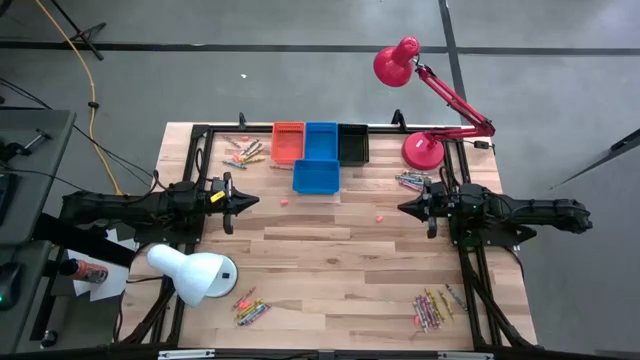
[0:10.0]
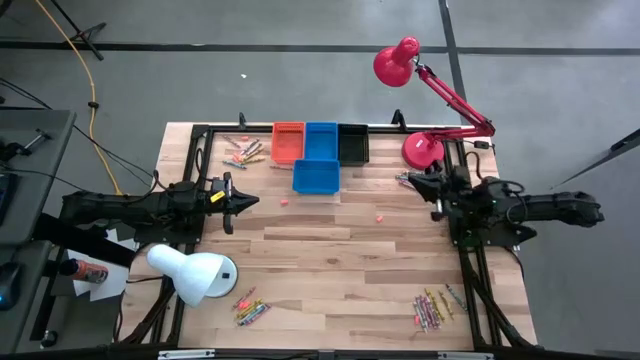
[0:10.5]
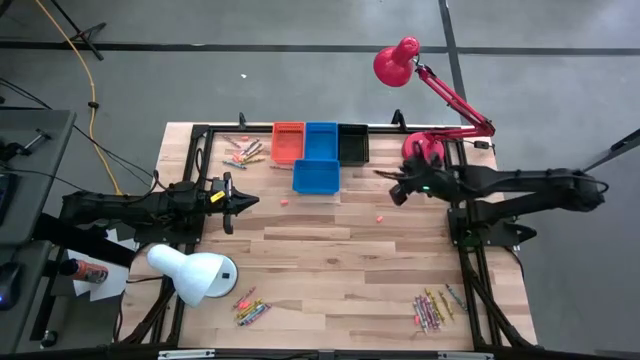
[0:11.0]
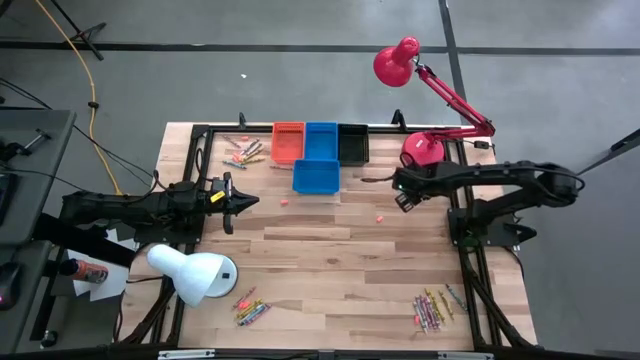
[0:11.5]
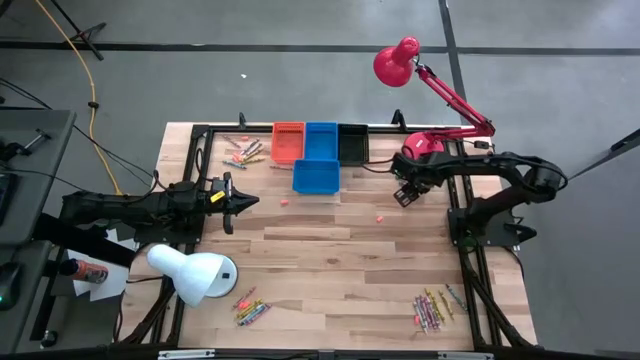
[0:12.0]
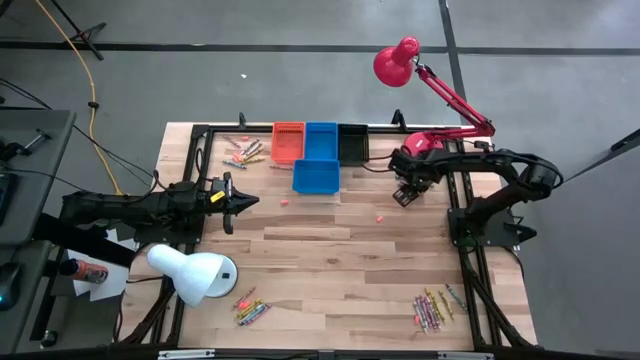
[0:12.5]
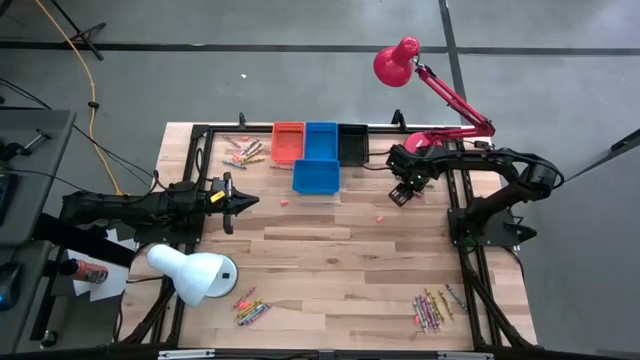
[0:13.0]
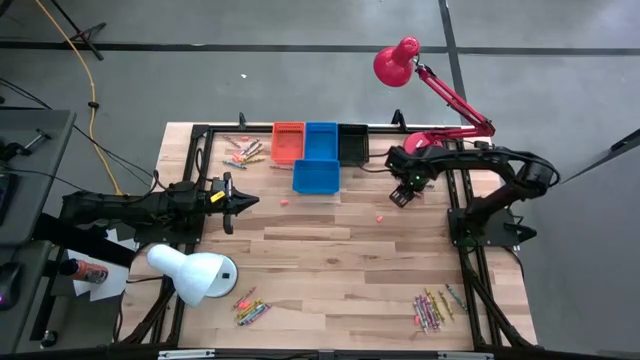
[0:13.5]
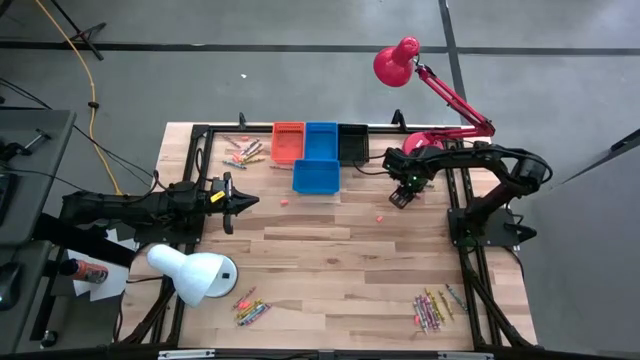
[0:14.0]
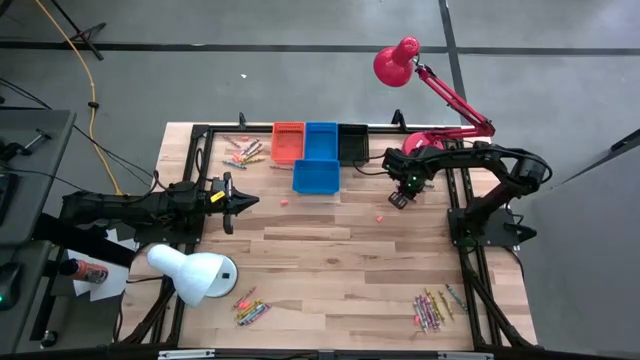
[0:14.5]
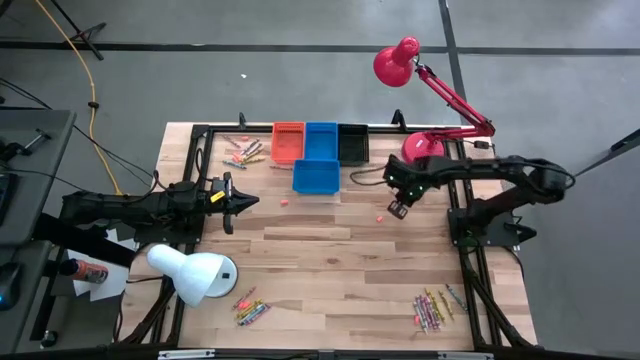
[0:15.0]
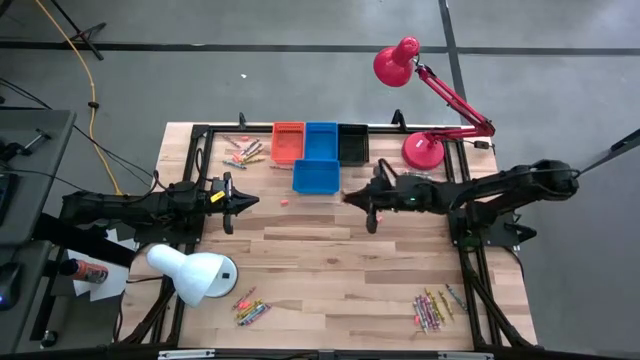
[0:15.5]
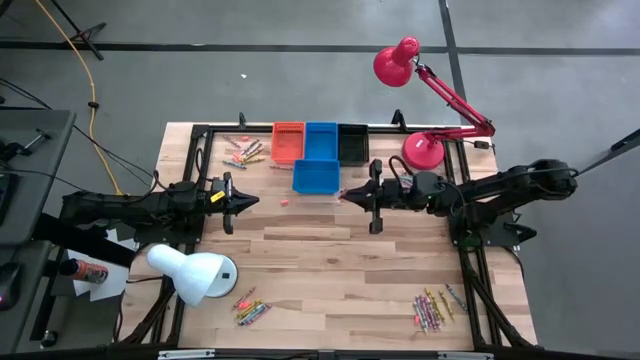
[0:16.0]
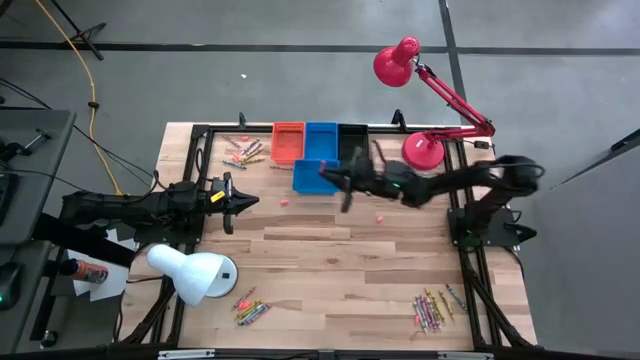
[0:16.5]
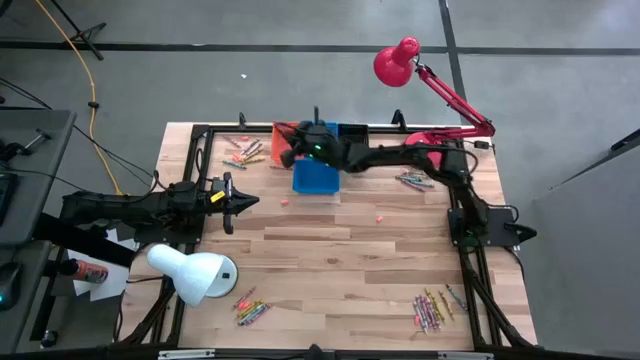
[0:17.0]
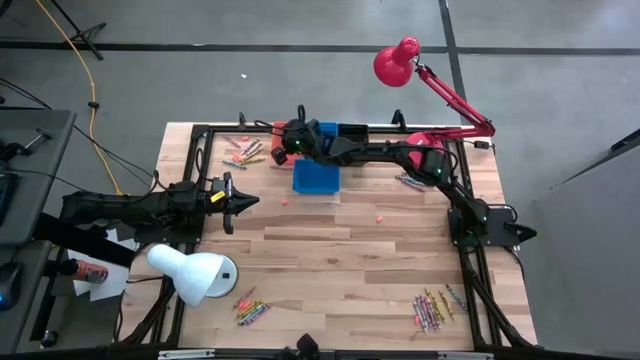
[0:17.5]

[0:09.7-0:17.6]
Task: Sort crayons
Put the pink crayon into the orange bin

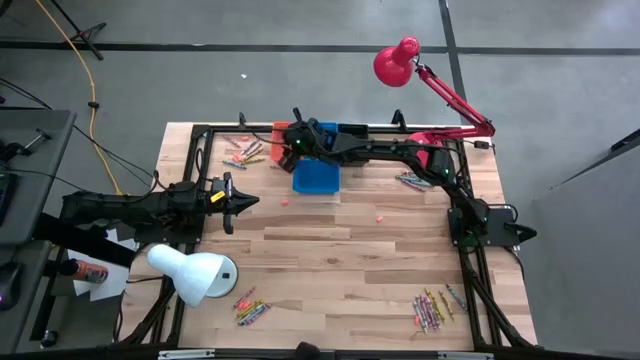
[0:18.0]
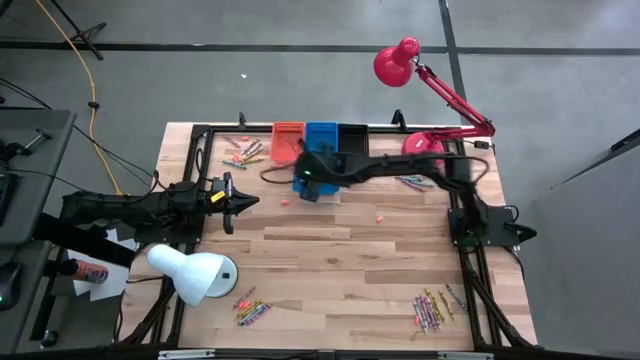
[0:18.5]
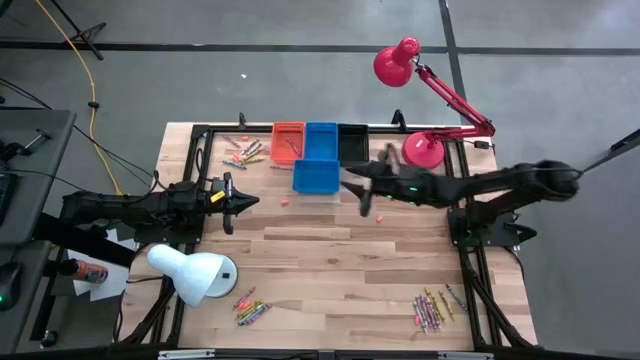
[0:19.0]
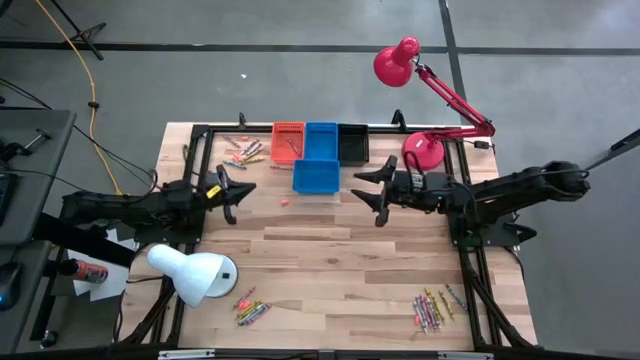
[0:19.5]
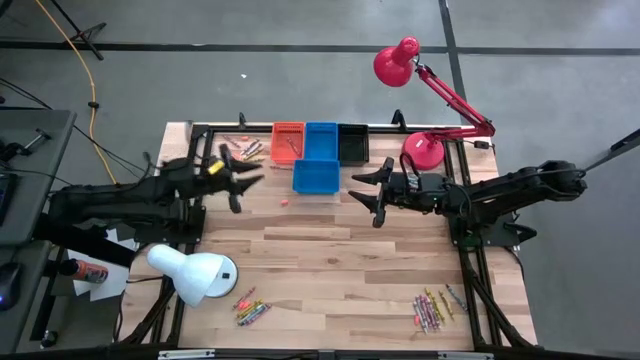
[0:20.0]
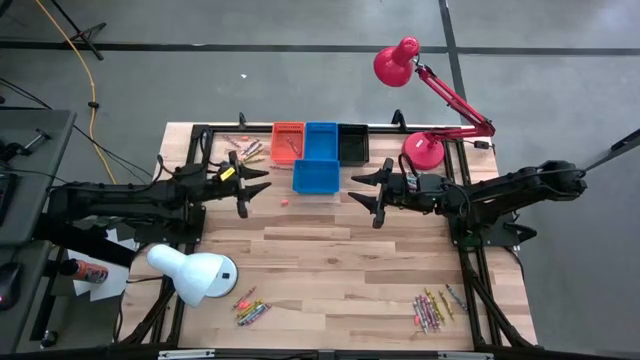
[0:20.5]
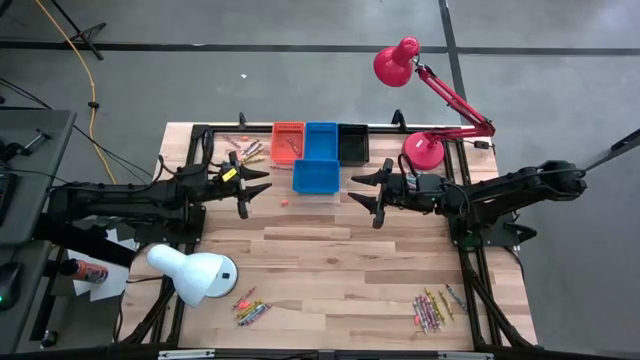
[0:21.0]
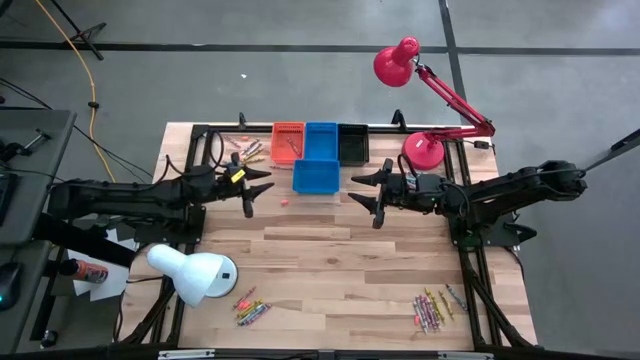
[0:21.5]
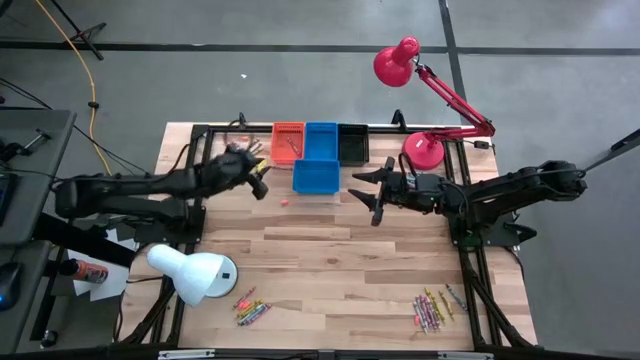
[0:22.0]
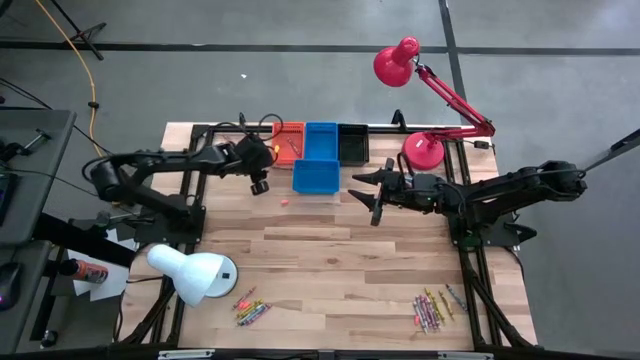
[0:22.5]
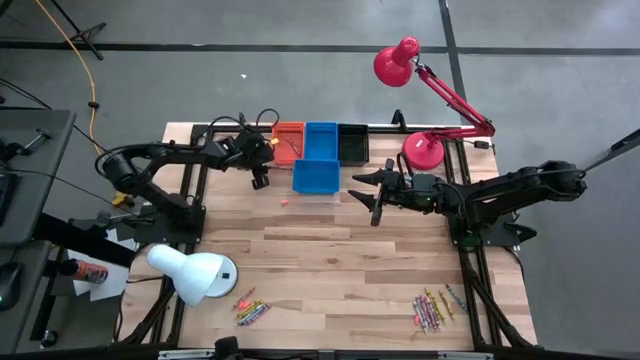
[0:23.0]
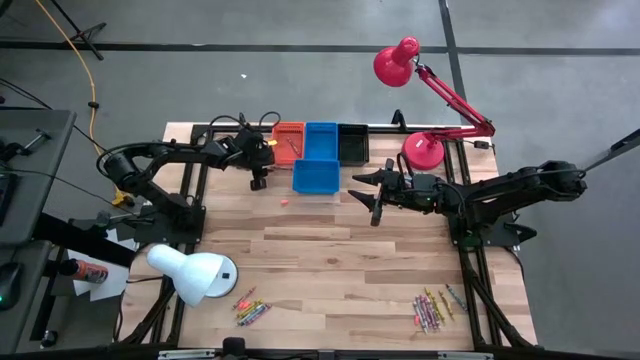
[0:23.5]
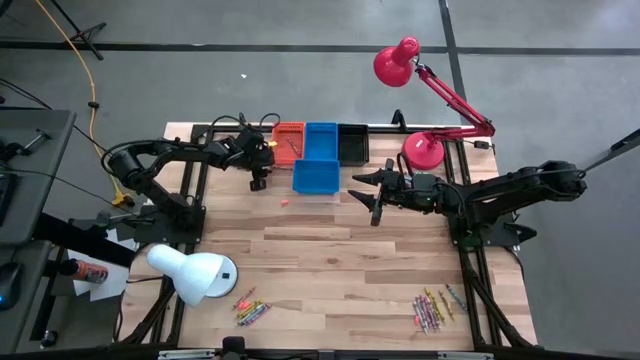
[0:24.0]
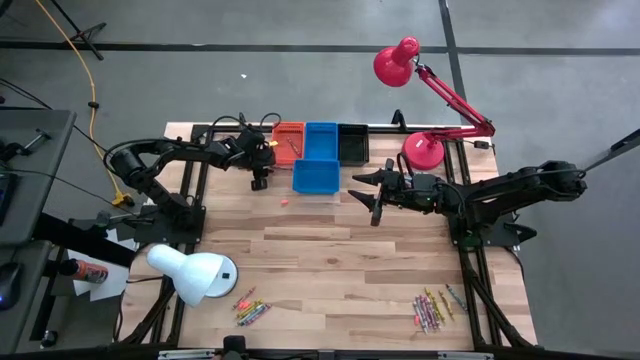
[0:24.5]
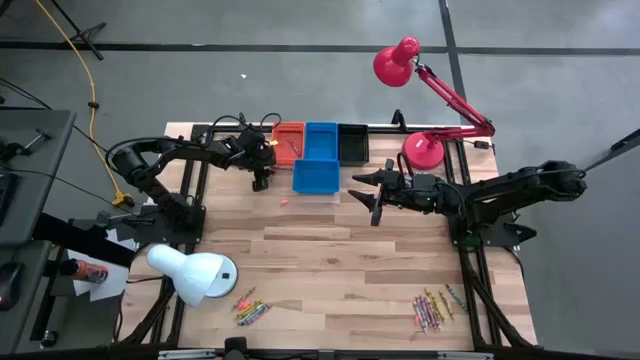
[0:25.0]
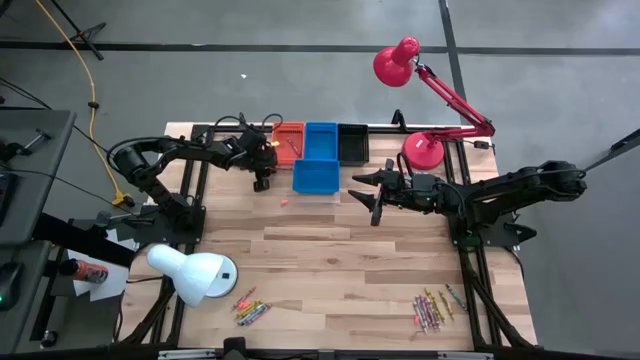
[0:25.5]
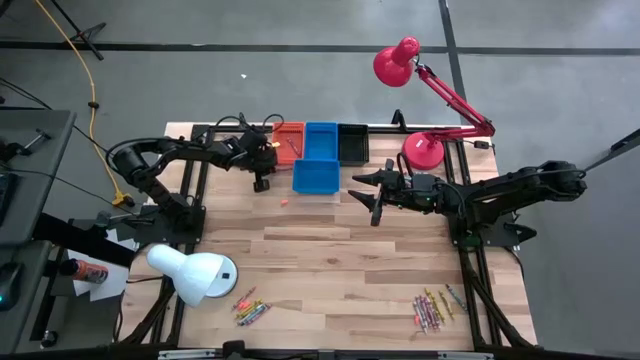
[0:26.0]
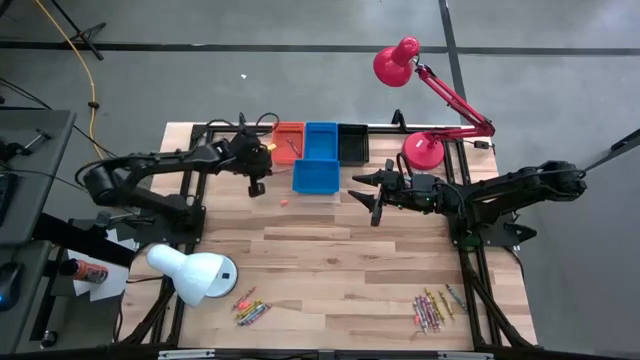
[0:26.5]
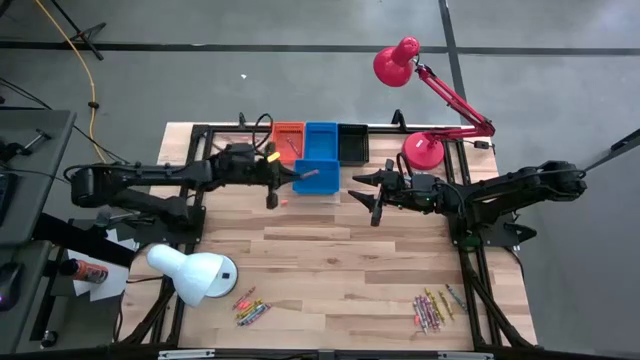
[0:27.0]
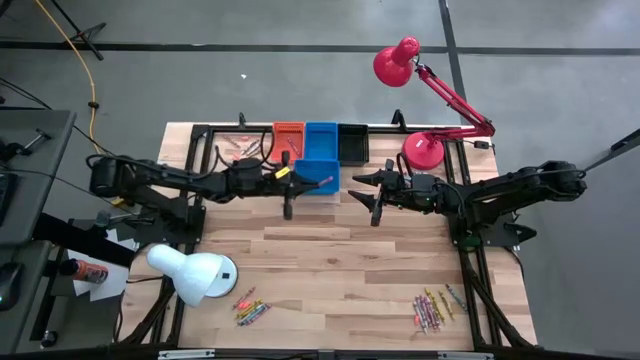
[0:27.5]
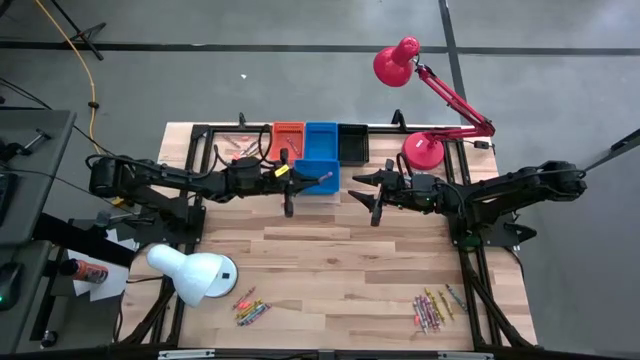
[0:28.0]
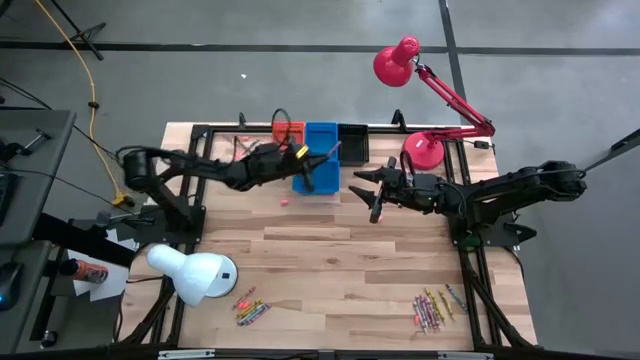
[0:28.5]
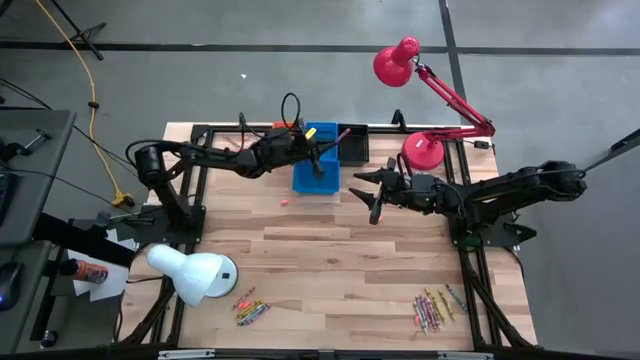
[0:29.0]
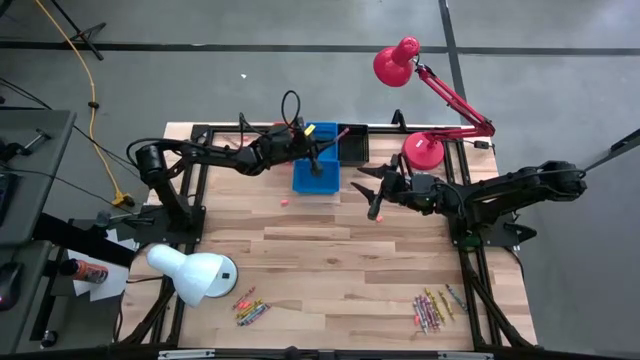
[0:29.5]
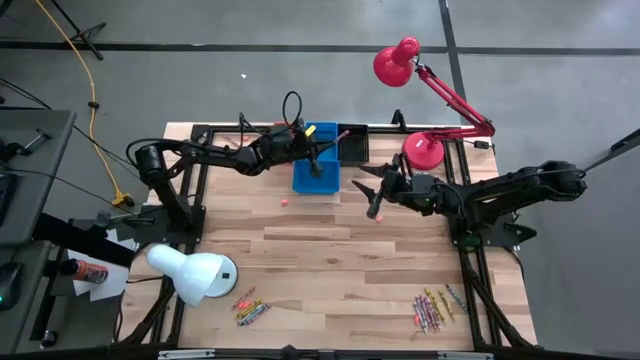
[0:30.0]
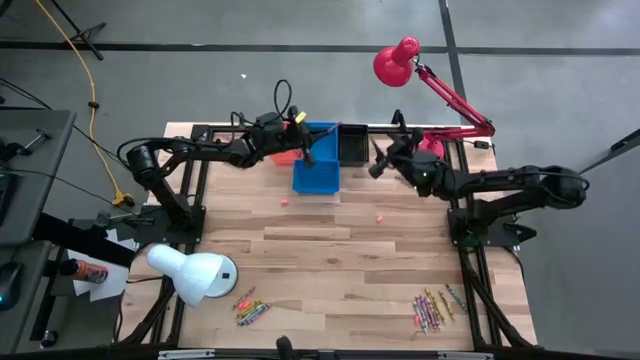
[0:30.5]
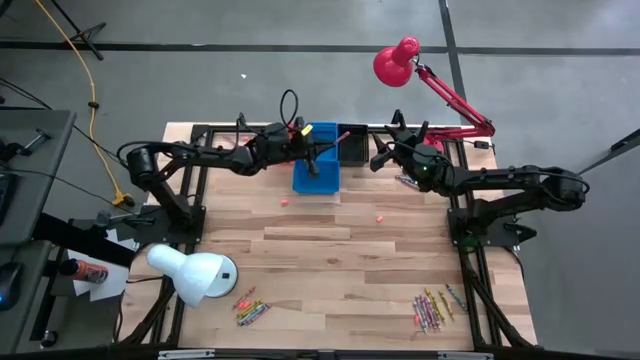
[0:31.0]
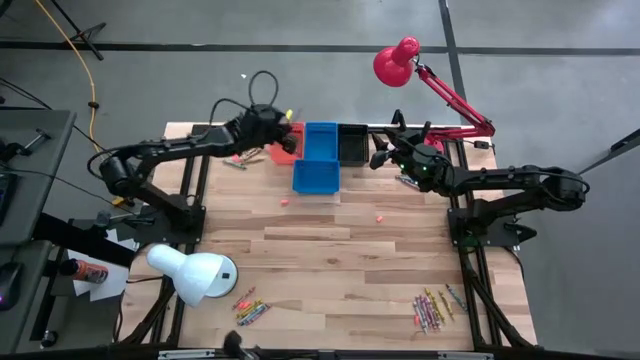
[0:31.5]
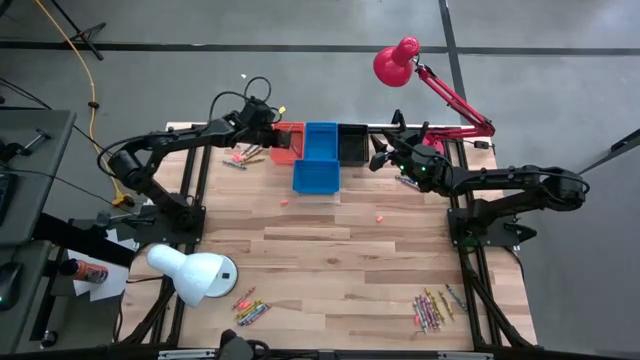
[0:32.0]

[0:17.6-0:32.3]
Put the pink crayon into the orange bin
